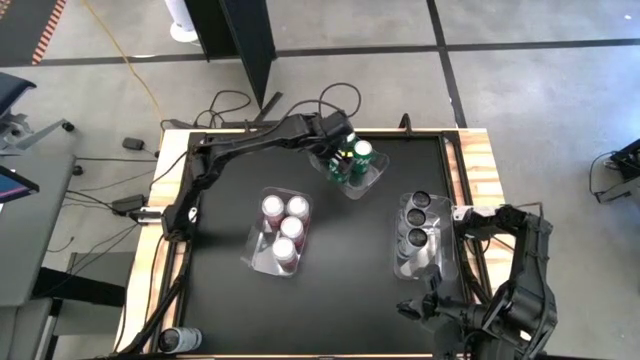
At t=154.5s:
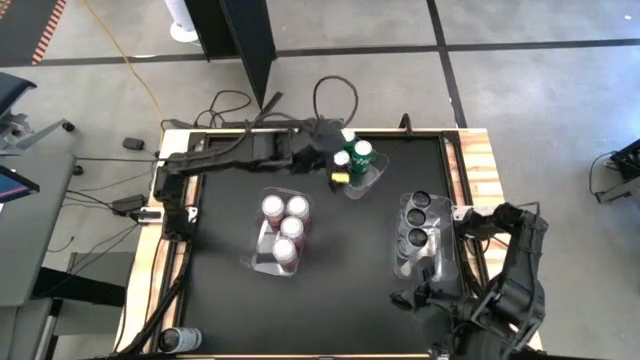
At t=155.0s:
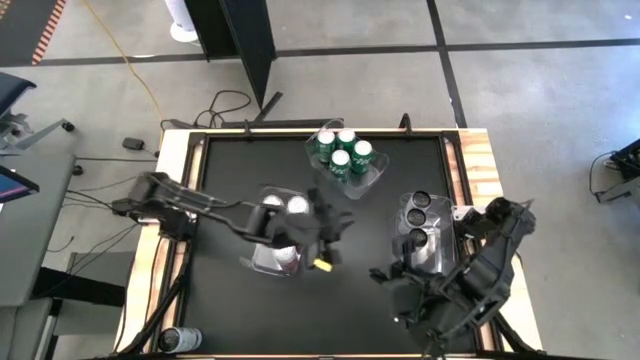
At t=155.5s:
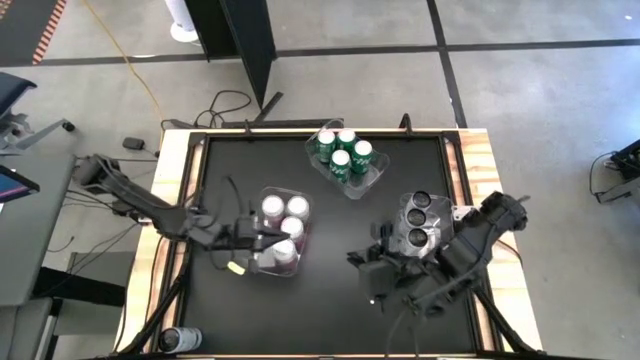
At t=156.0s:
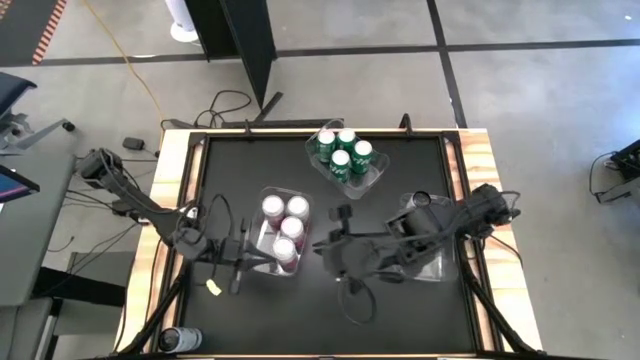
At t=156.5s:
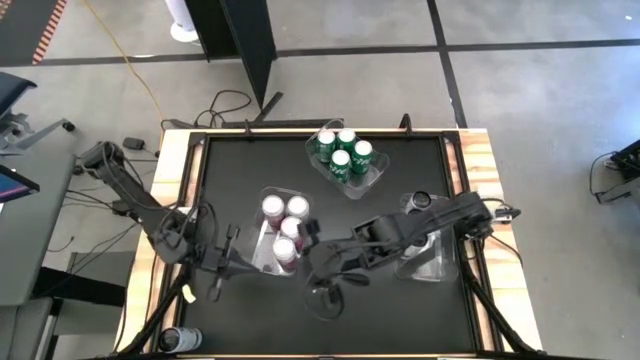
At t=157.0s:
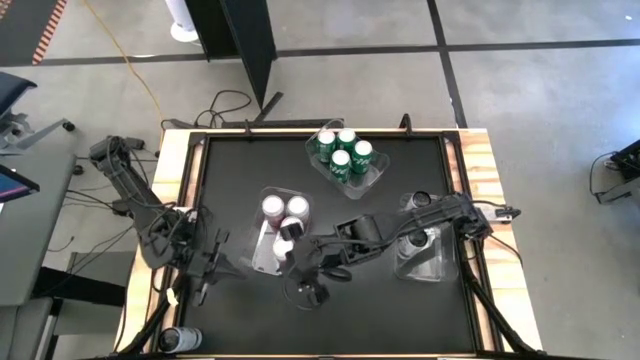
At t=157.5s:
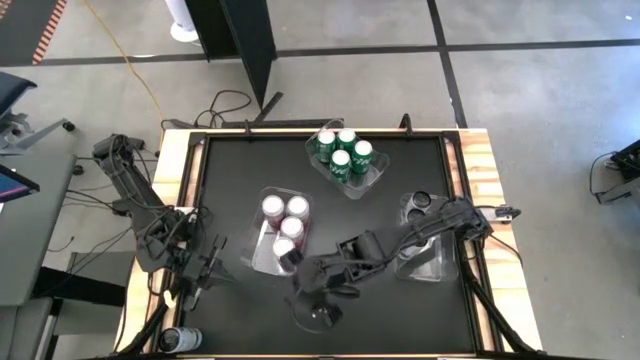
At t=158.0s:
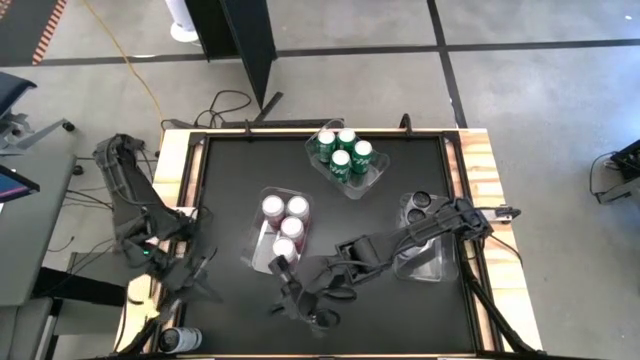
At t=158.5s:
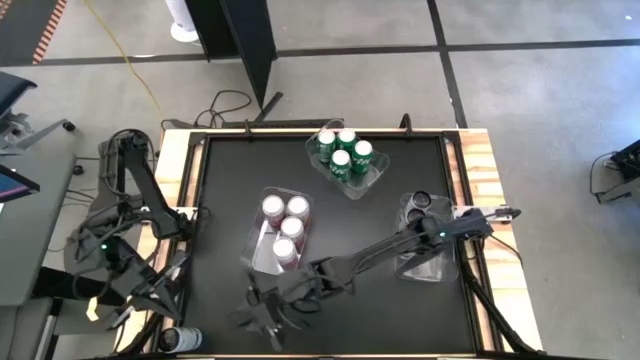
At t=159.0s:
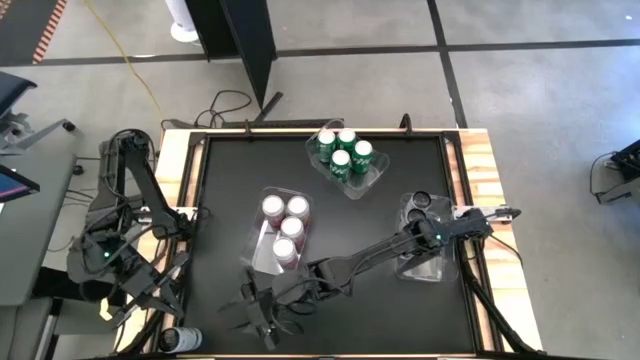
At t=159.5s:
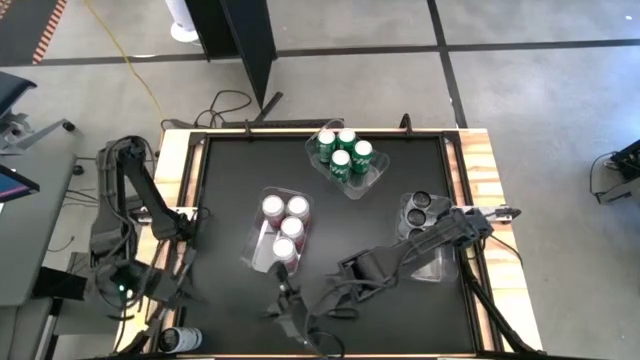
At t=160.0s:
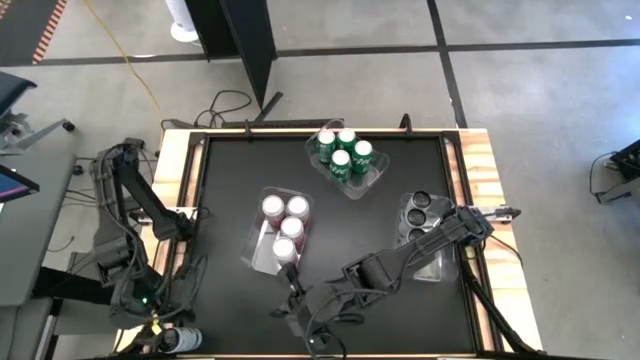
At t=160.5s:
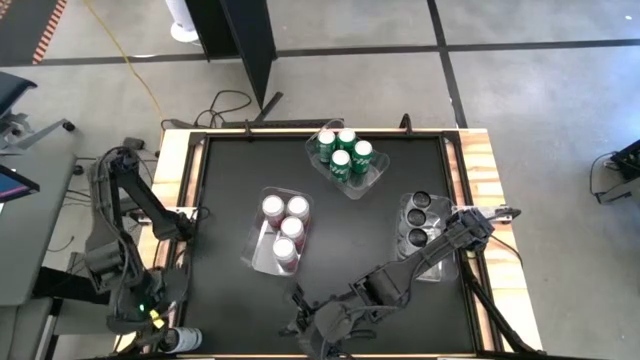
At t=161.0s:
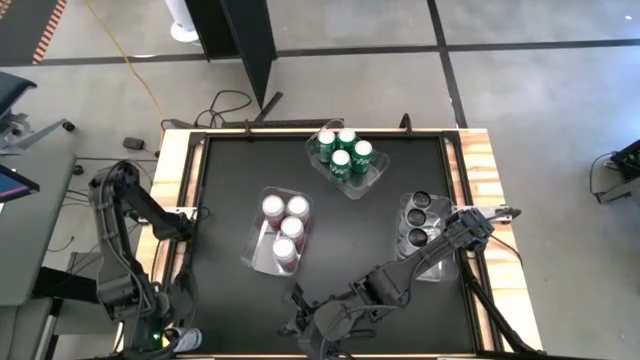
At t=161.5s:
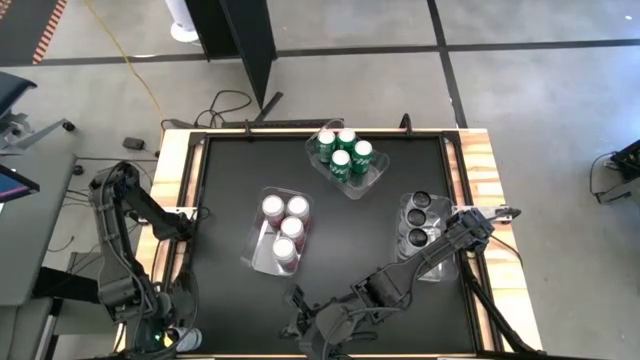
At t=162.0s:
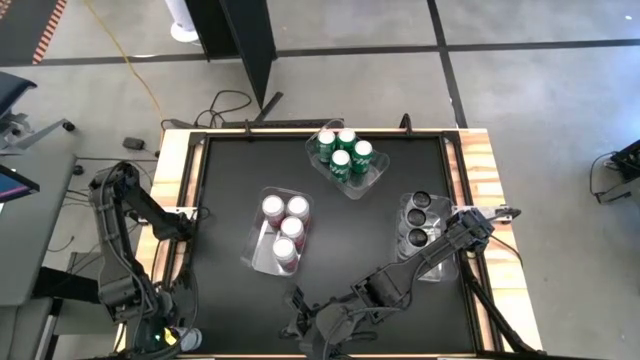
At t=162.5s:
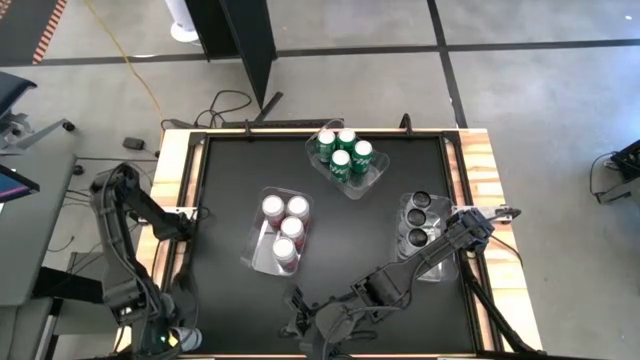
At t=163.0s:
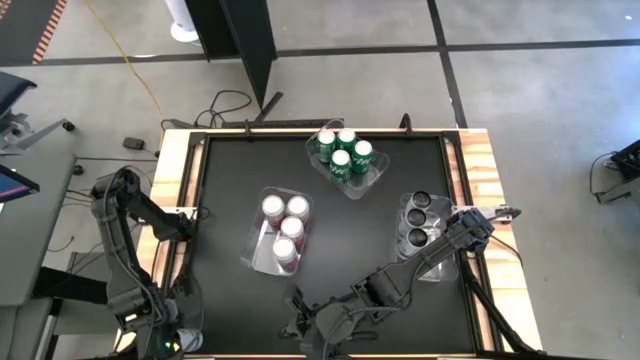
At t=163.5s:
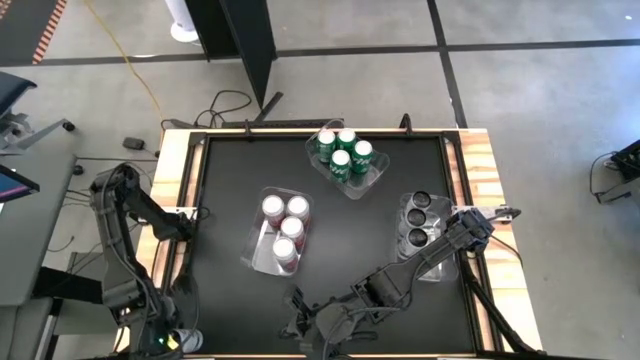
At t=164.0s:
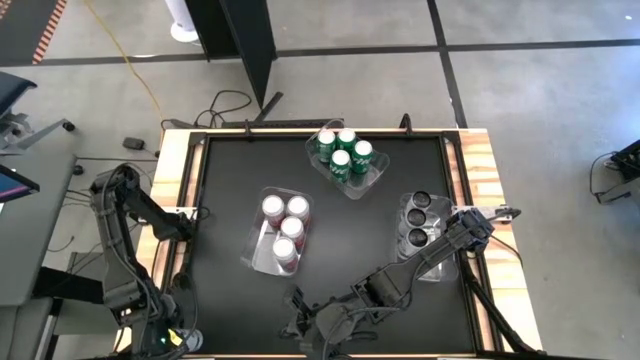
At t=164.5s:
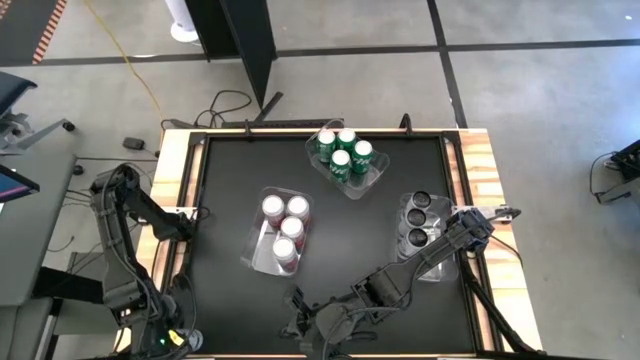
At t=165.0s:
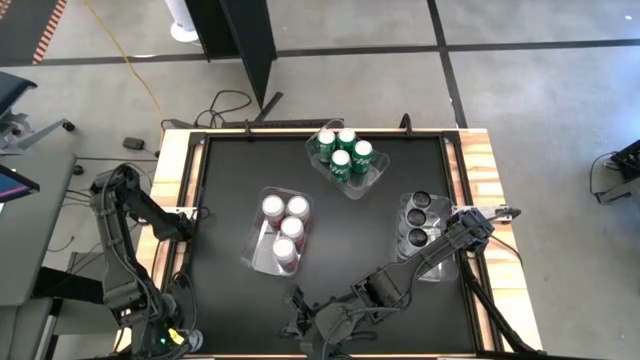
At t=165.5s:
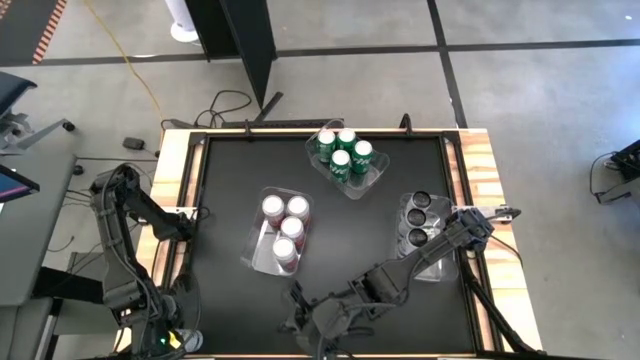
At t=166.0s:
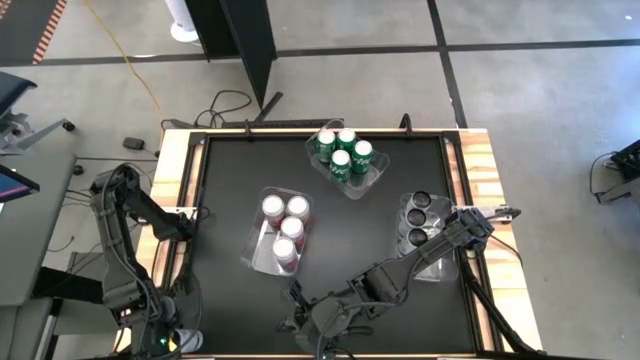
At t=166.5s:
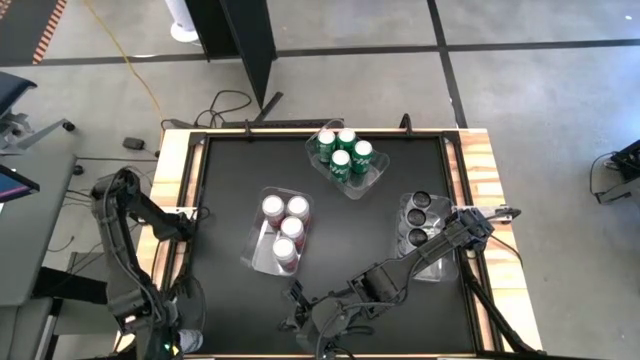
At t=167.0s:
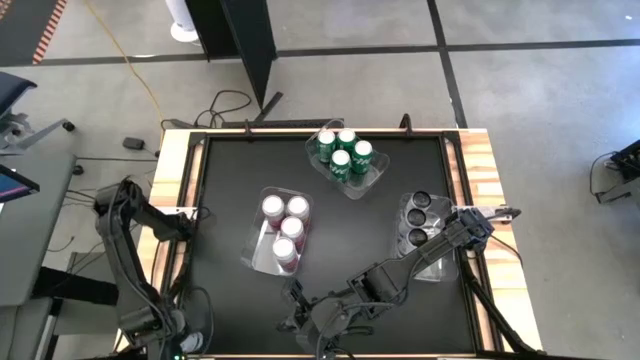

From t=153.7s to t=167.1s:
Task: Sort soda cans
Put the white blue soda can into the right transparent bin

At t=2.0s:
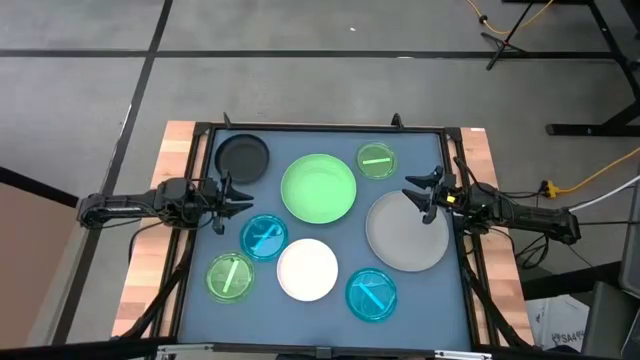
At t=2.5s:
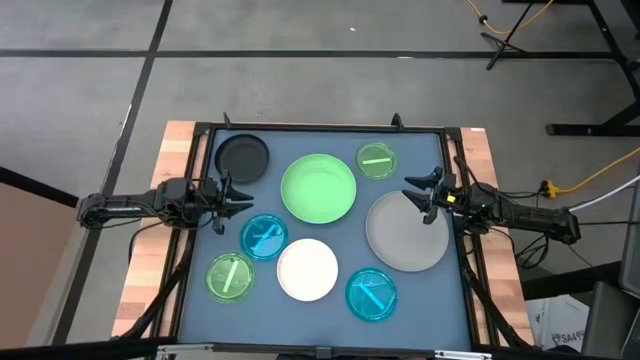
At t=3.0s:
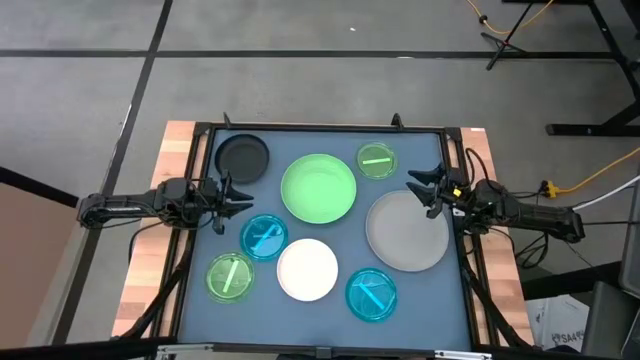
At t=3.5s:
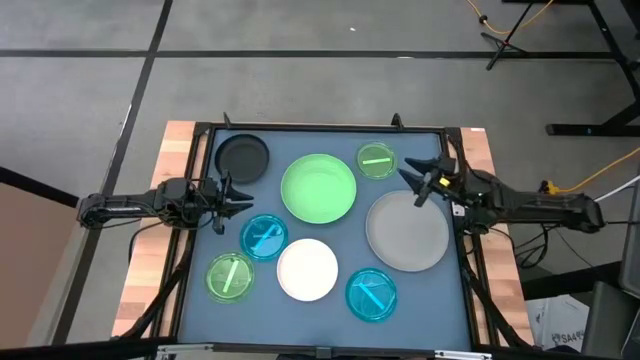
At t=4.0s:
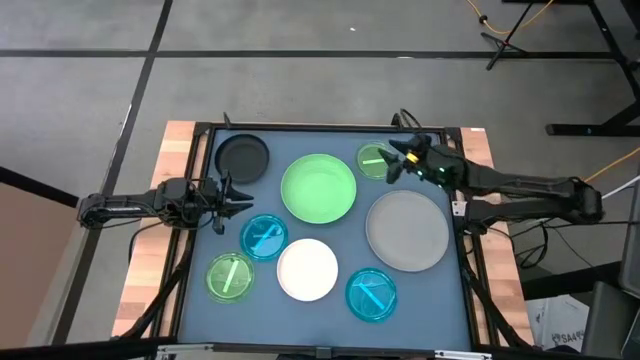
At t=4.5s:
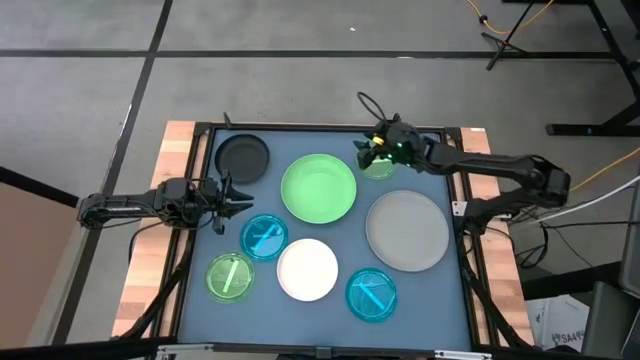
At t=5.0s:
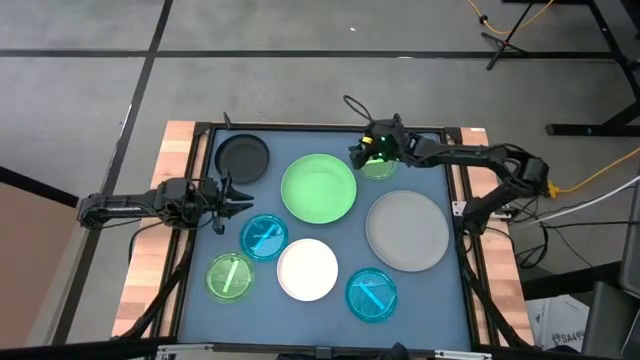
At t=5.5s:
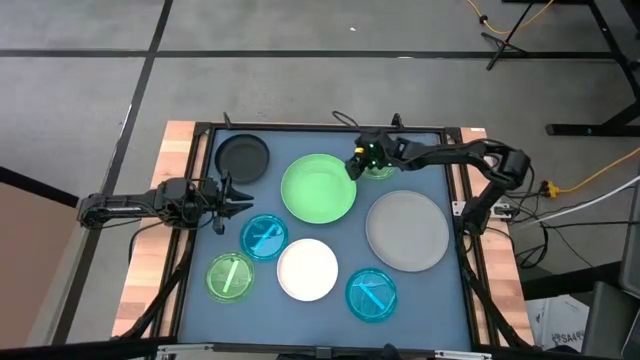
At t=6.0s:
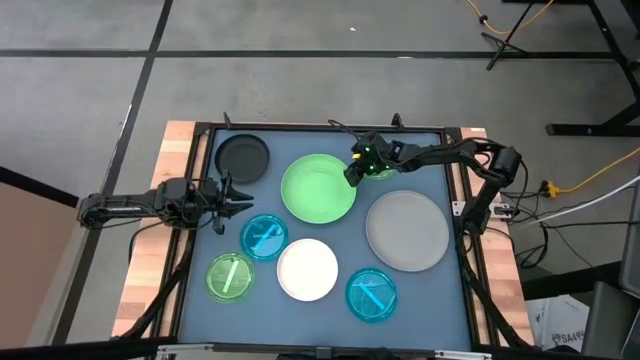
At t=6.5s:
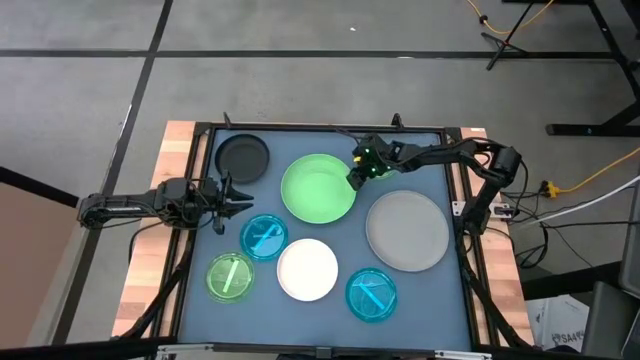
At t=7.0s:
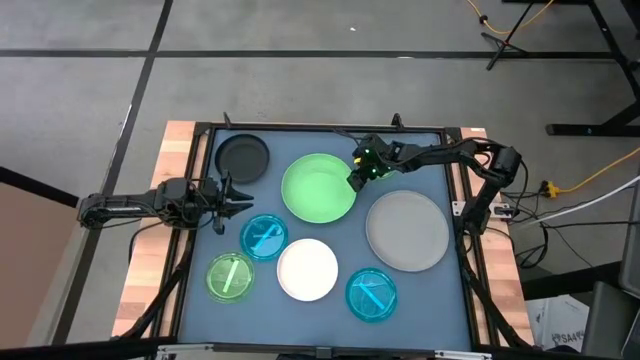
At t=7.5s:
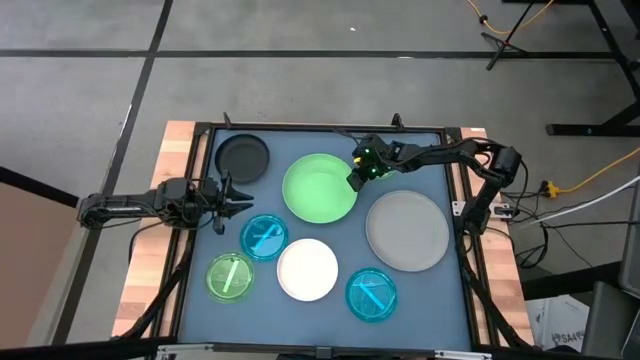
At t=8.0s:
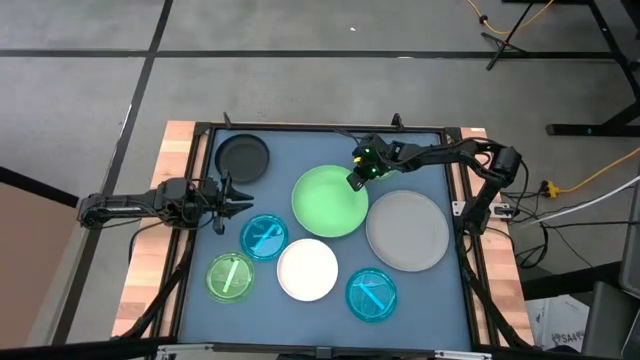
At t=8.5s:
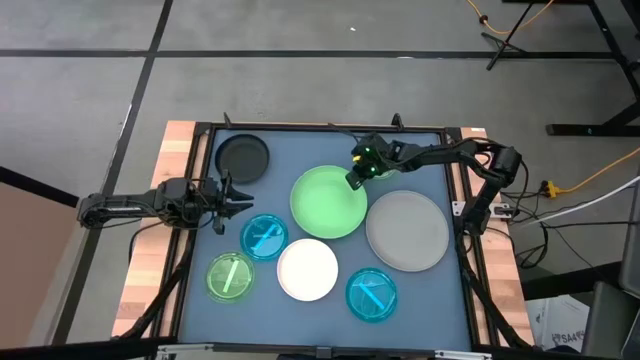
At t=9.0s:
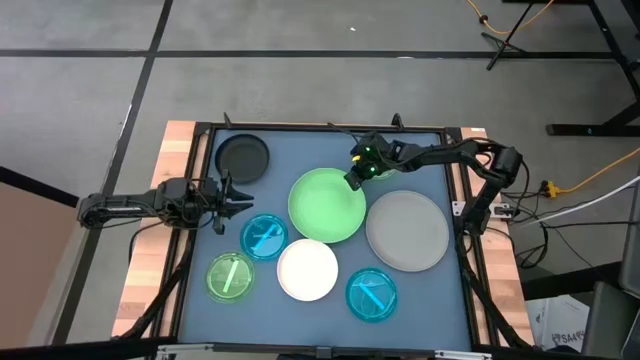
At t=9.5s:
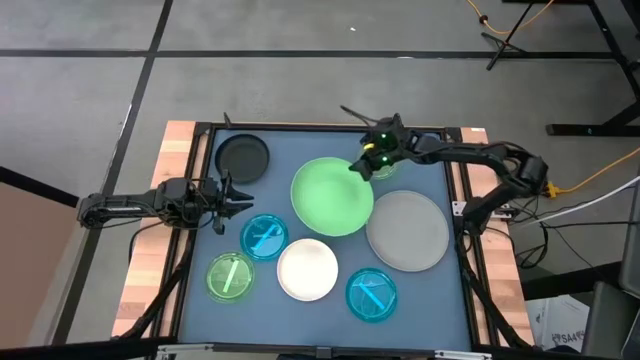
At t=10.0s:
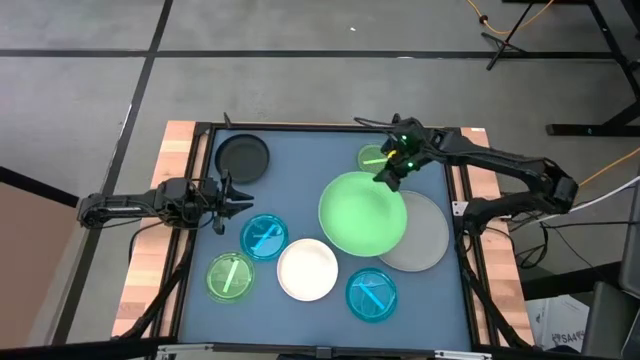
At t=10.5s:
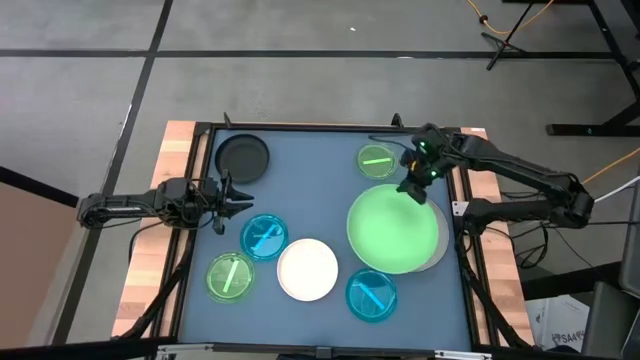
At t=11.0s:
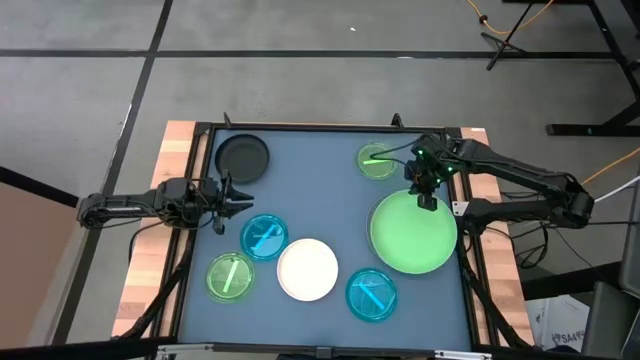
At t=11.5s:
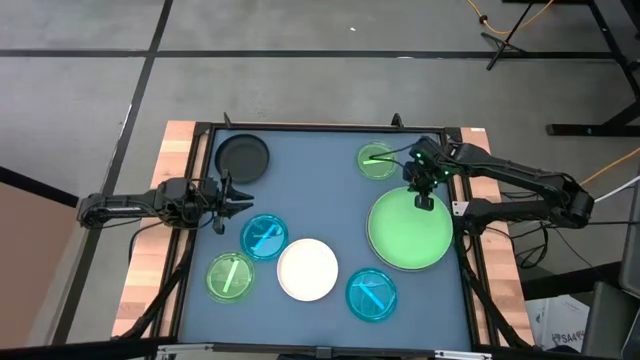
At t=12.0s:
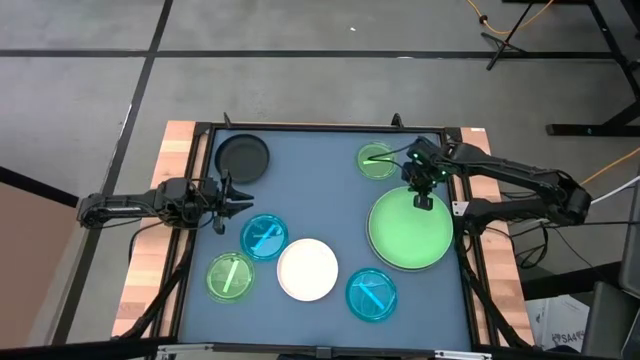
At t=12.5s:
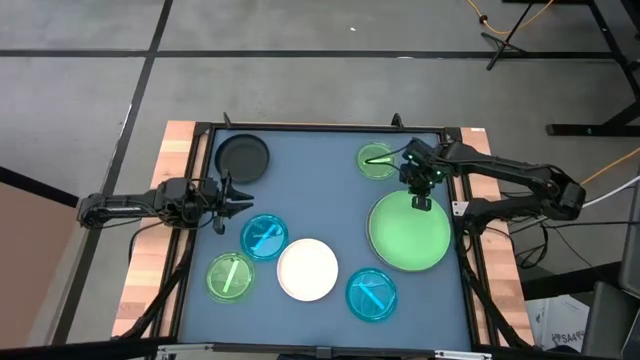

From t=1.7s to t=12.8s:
Task: Stack plastic plates
Stack the light green plate on top of the gray plate
